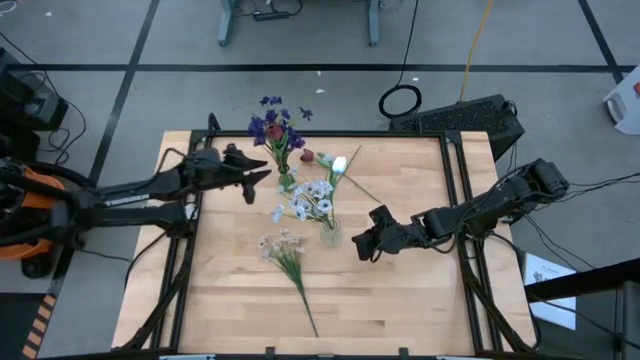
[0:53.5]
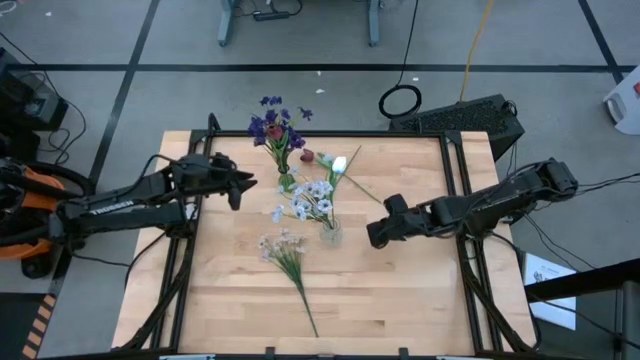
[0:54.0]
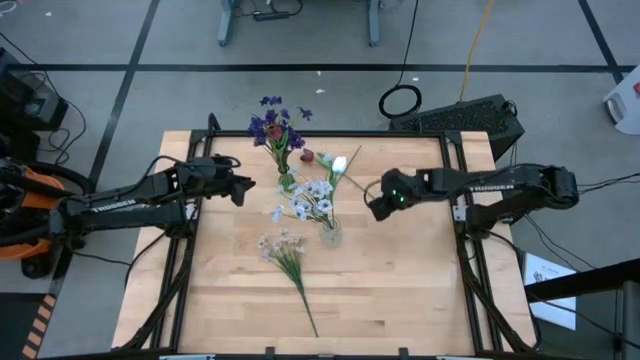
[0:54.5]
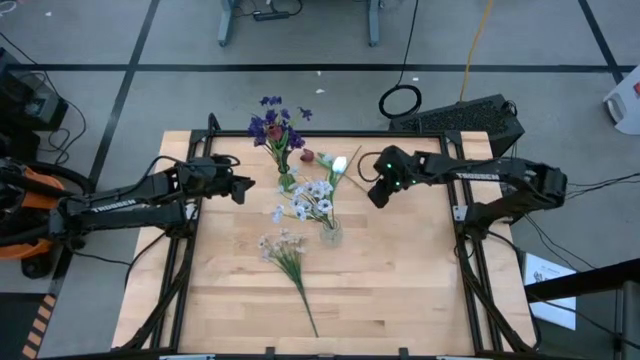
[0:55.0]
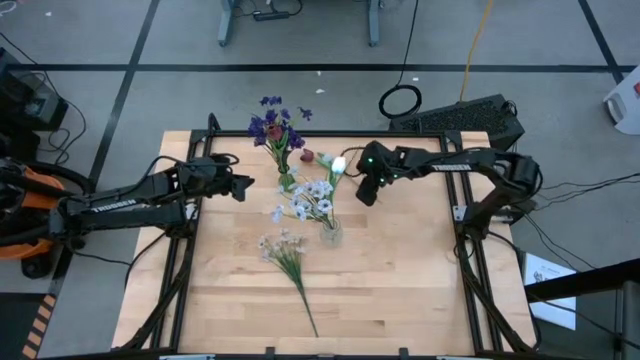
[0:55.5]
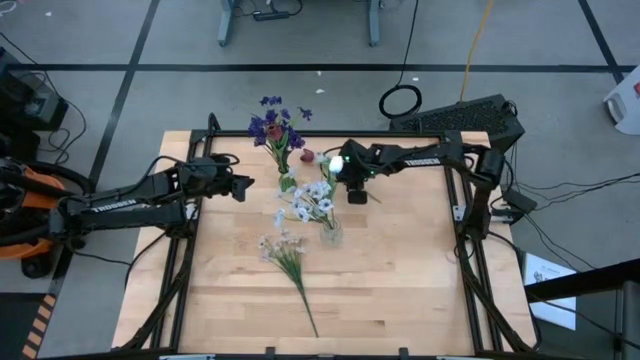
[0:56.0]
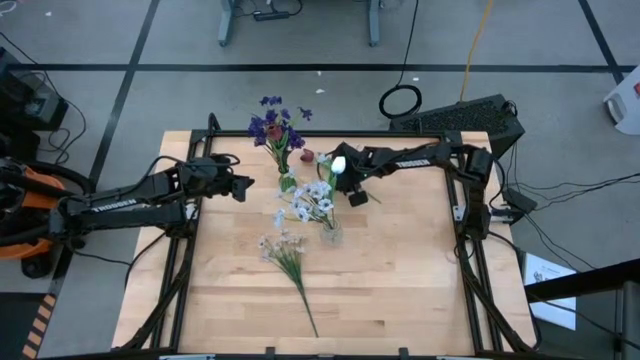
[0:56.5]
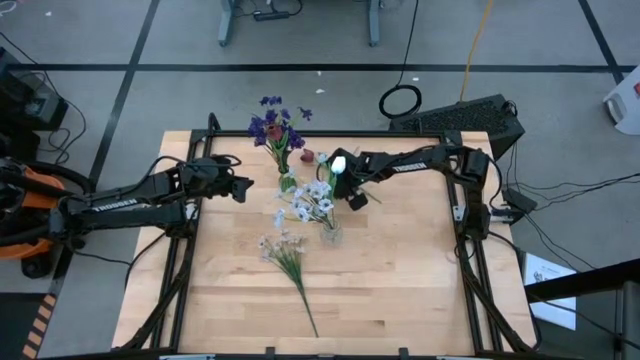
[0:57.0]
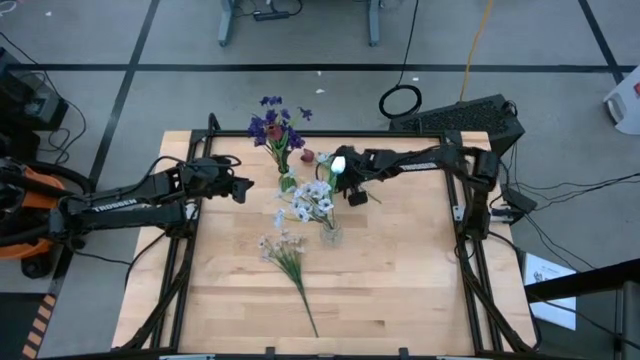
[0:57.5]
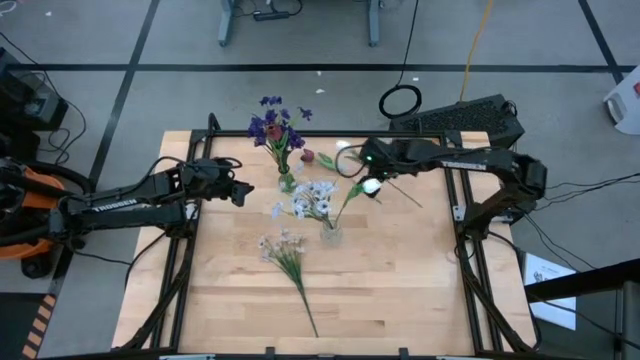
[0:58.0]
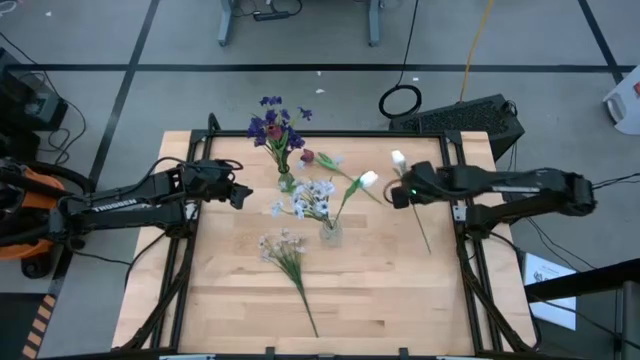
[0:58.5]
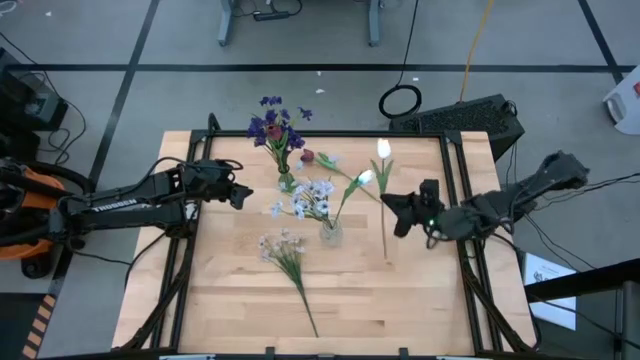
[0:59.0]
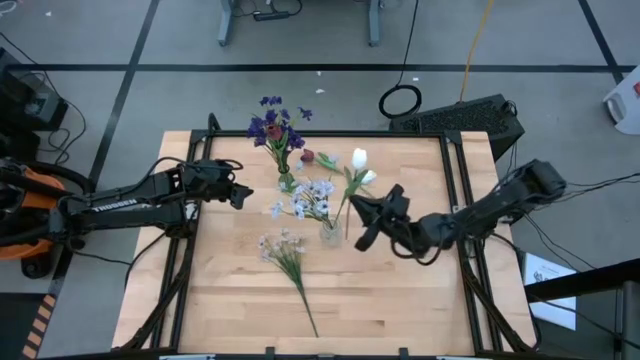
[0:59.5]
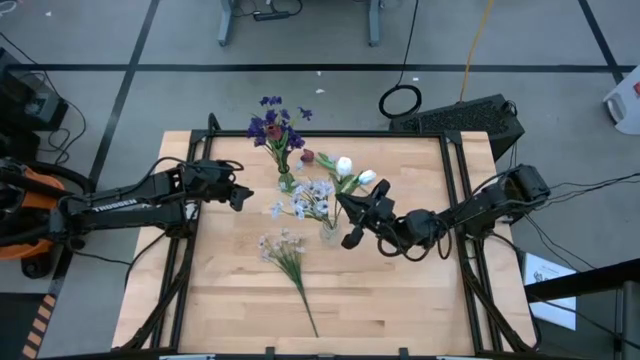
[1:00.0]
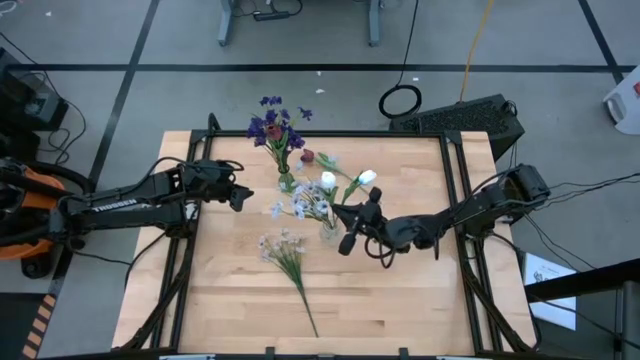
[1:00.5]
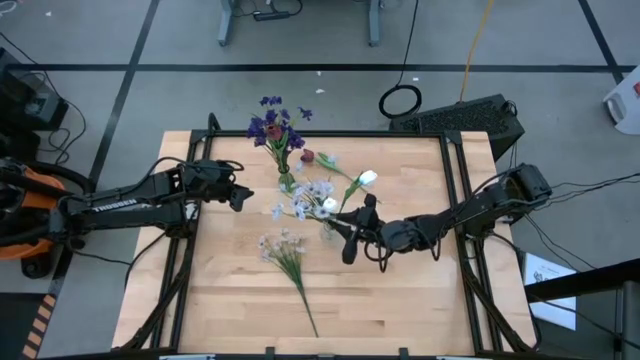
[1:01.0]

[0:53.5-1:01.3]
Task: Sort flowers into vase by color
Put the white flower into the transparent vase

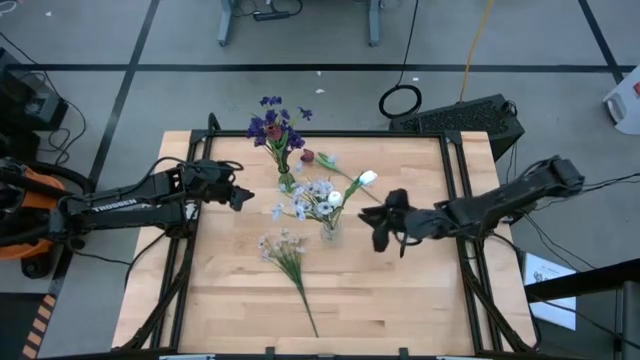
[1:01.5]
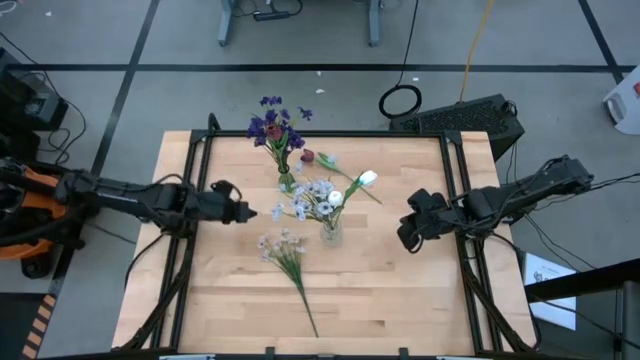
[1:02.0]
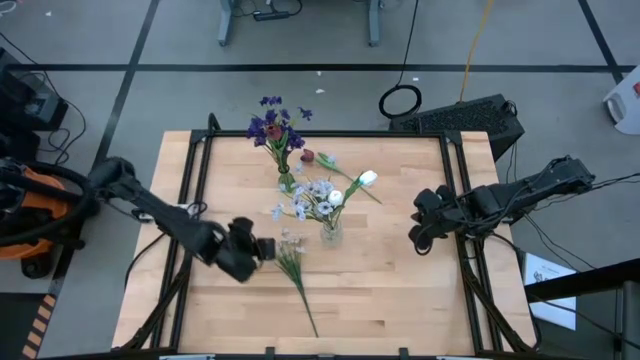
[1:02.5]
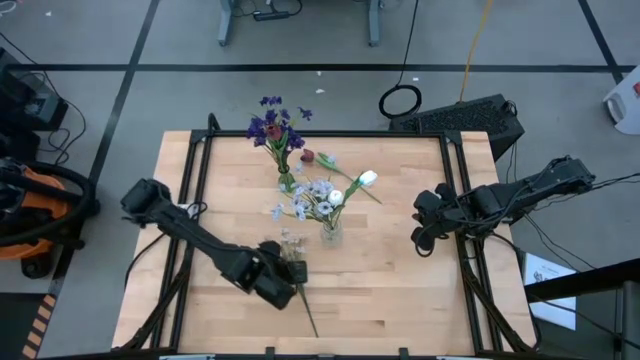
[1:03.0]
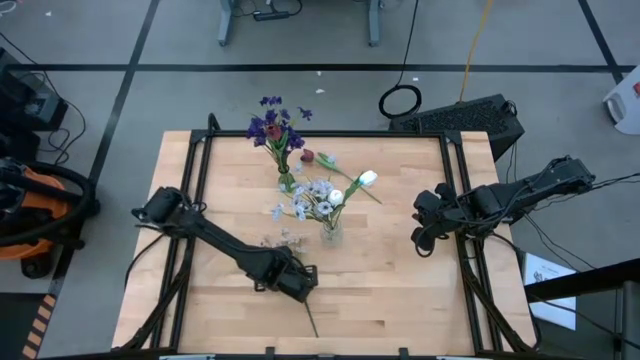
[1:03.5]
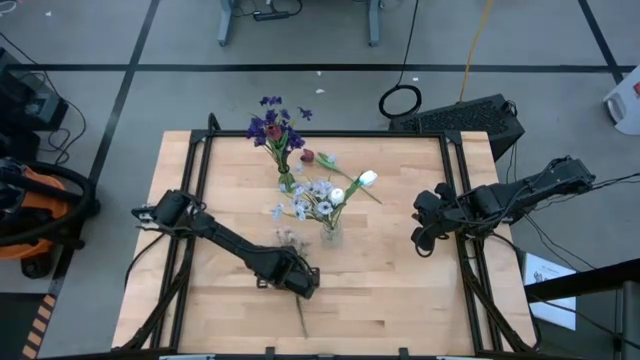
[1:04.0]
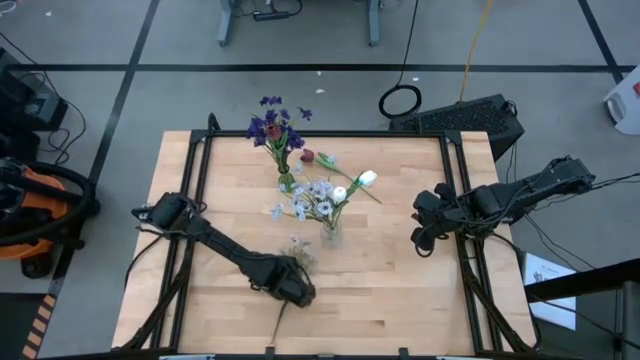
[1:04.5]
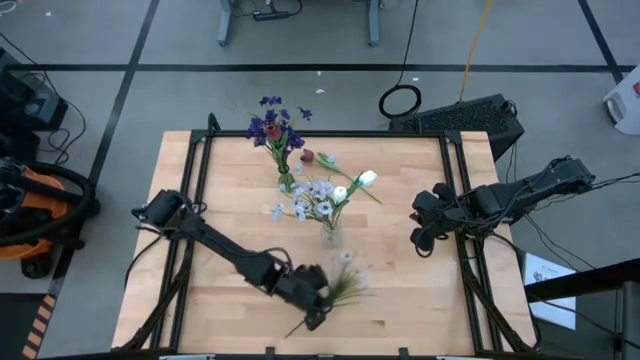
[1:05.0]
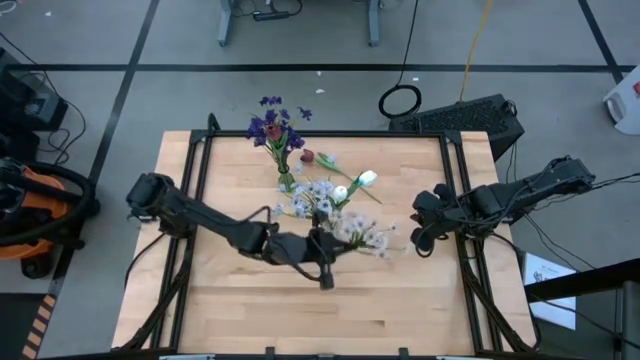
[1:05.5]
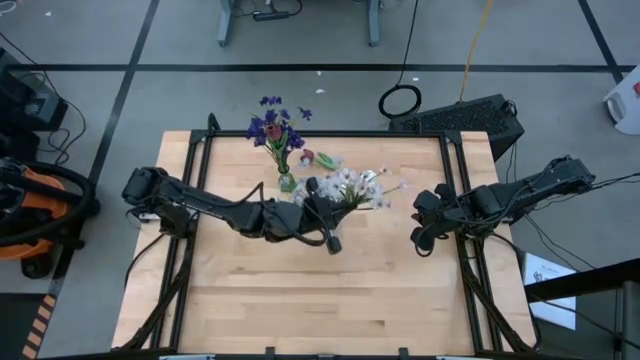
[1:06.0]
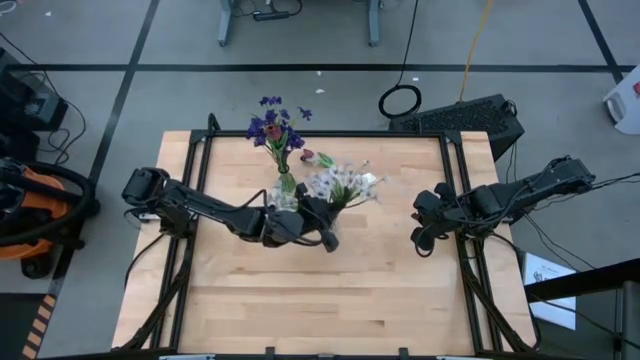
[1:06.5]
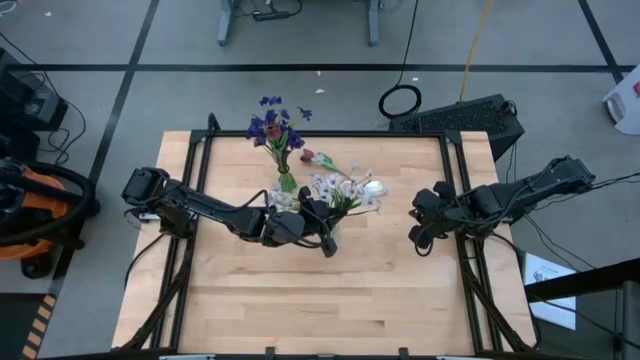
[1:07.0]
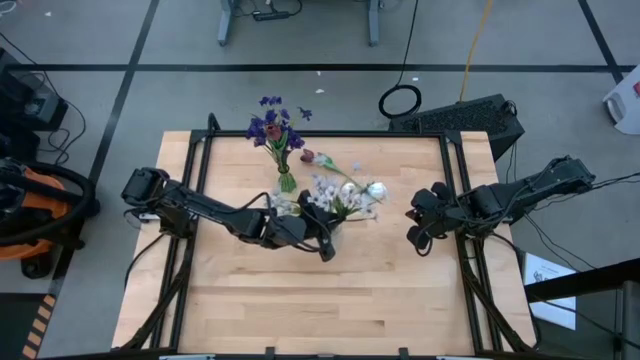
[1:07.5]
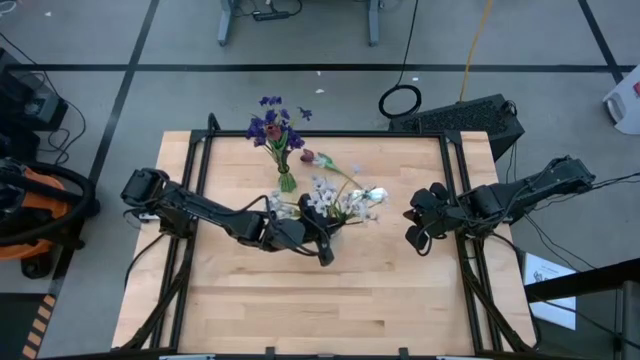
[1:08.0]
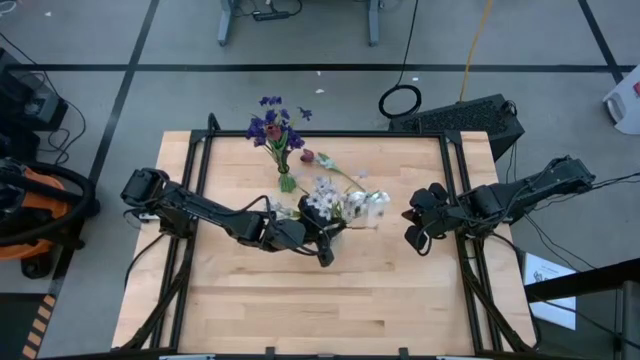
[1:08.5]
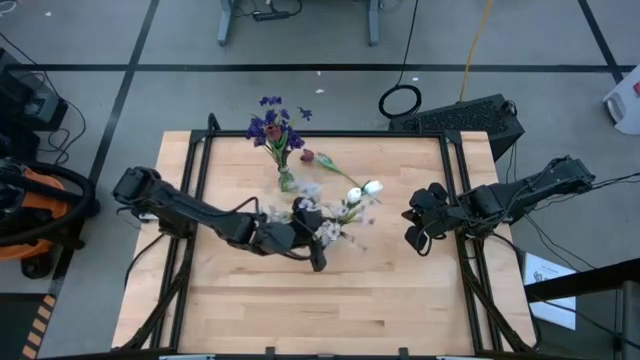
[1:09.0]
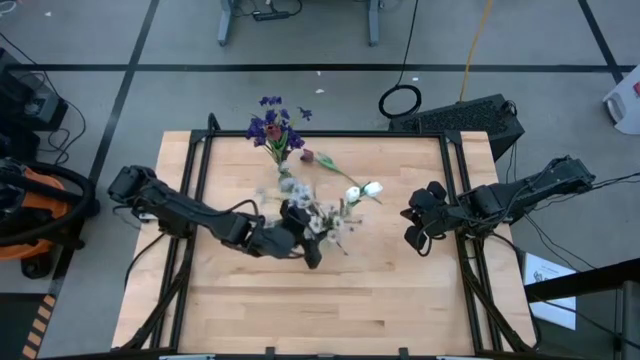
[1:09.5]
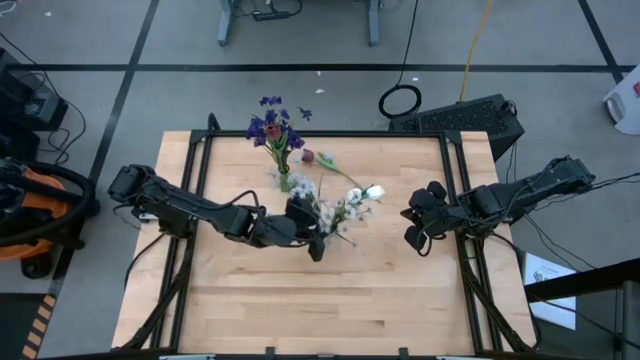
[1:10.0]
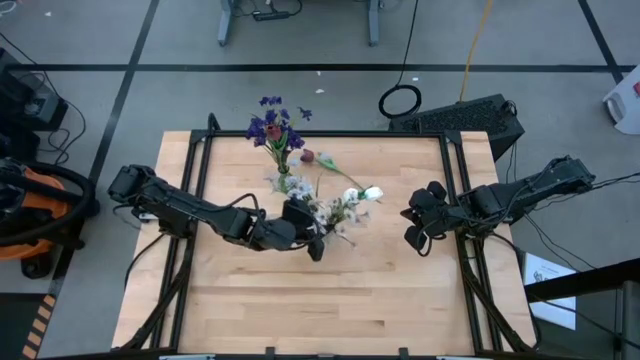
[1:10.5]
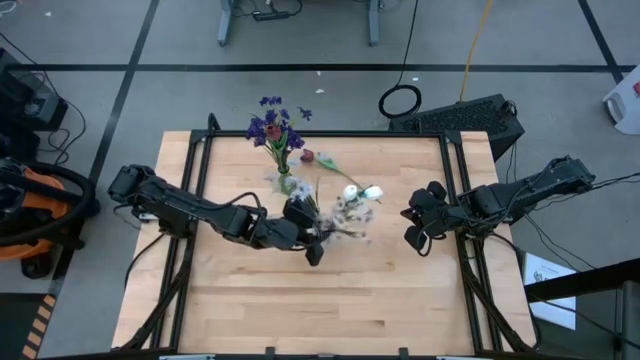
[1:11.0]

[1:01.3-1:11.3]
Put the white flowers into the transparent vase

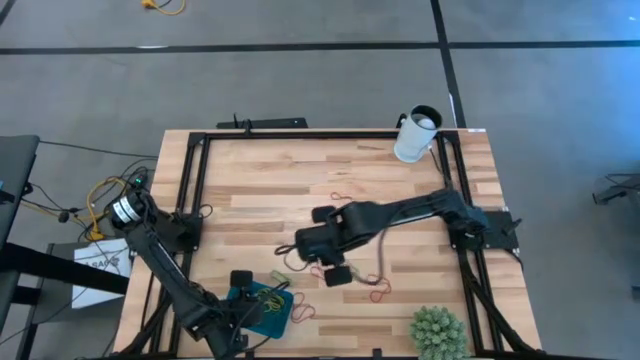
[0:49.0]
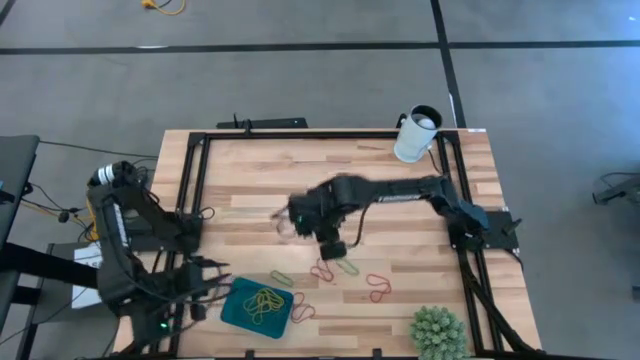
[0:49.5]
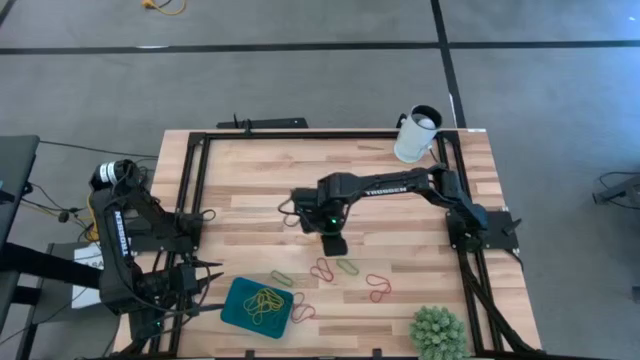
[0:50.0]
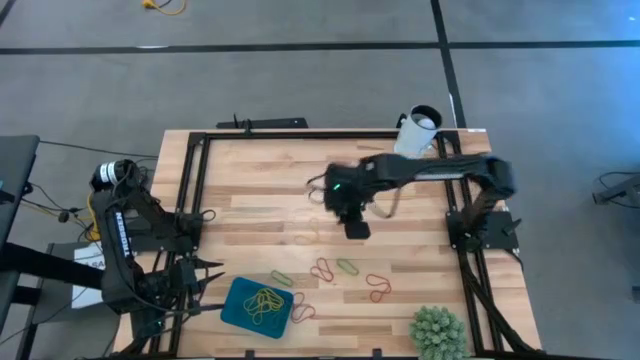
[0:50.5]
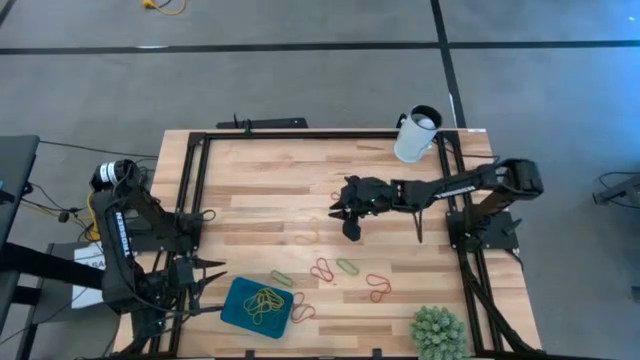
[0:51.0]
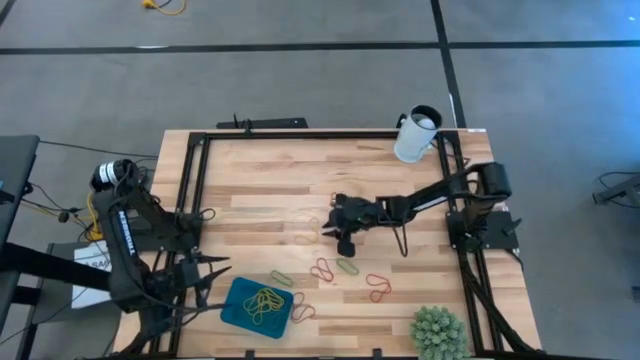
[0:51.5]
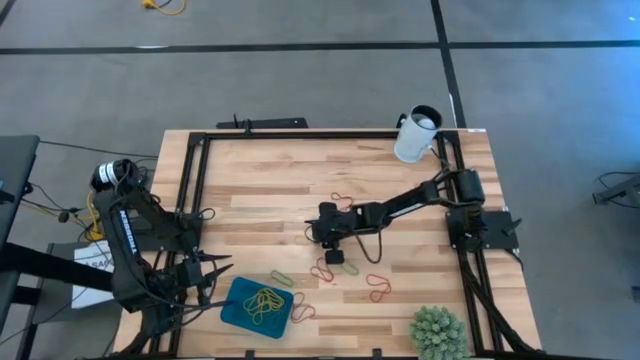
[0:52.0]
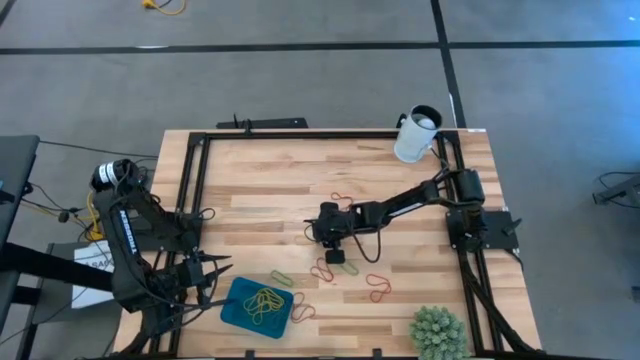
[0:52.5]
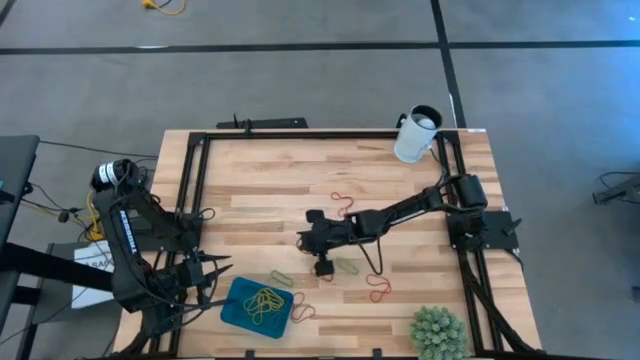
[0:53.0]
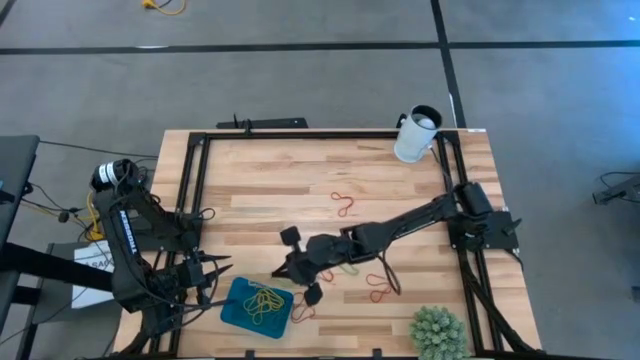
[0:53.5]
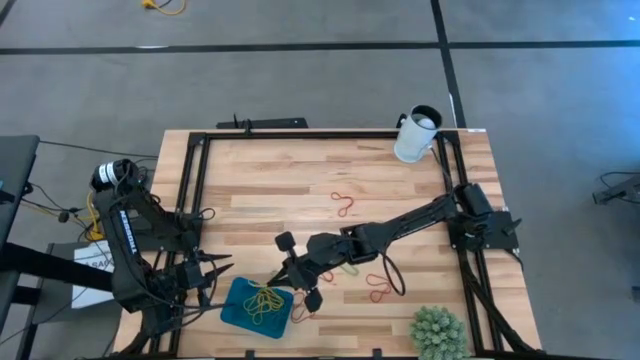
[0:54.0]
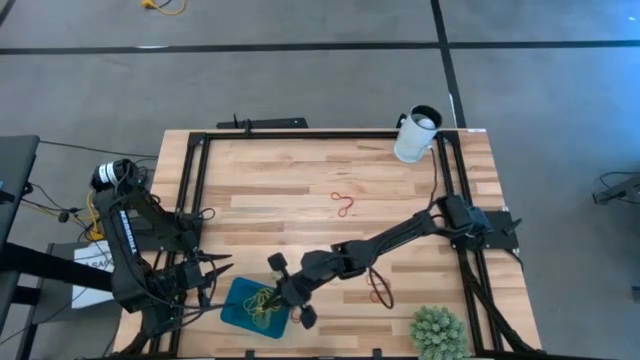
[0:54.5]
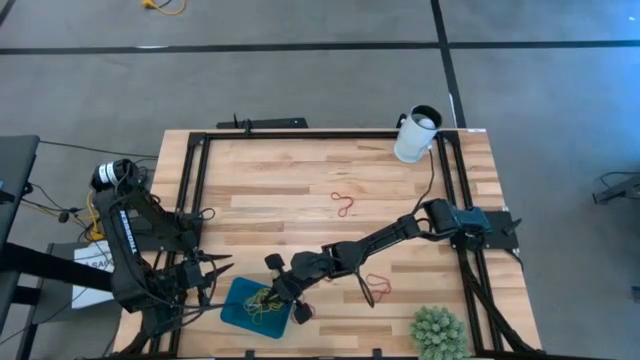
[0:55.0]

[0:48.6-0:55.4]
Task: Pick and place items into bin
Put the yellow rubber band into the blue bin
